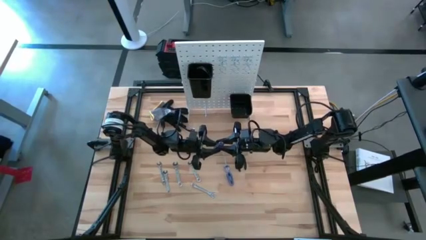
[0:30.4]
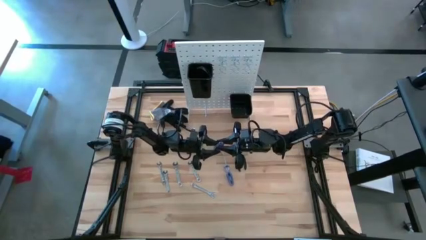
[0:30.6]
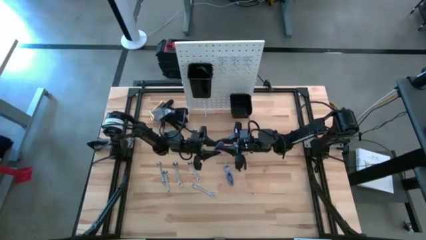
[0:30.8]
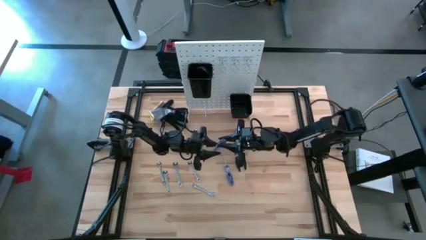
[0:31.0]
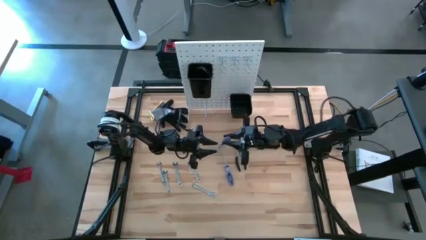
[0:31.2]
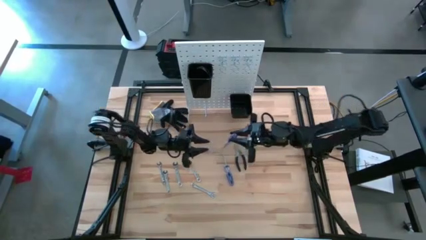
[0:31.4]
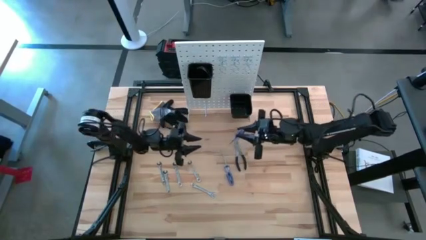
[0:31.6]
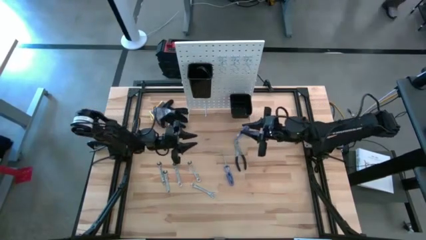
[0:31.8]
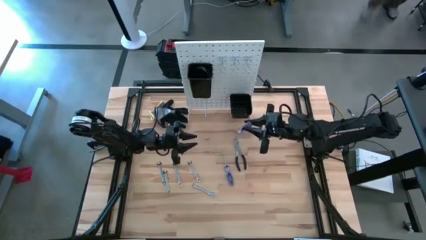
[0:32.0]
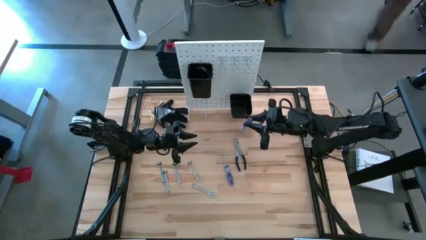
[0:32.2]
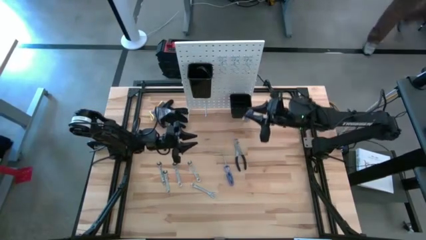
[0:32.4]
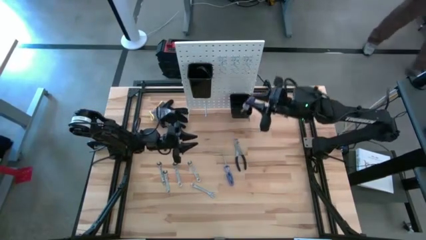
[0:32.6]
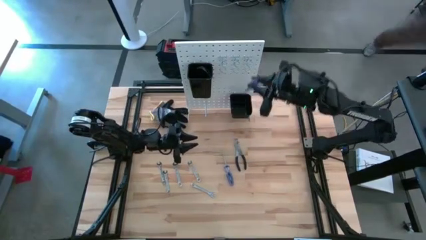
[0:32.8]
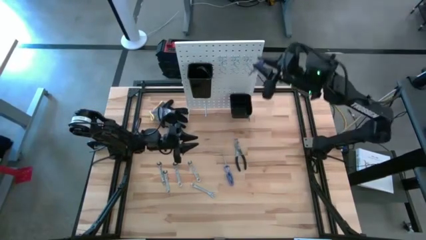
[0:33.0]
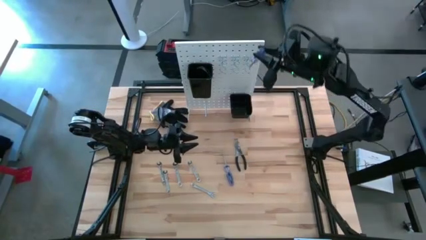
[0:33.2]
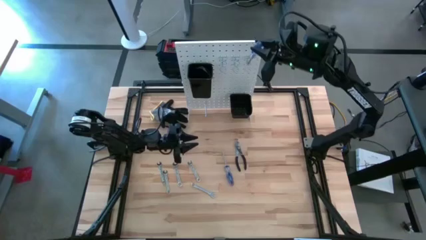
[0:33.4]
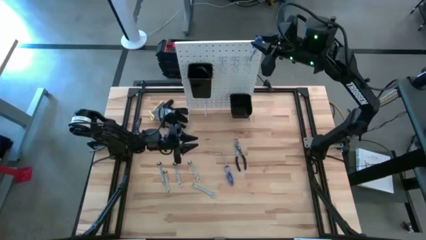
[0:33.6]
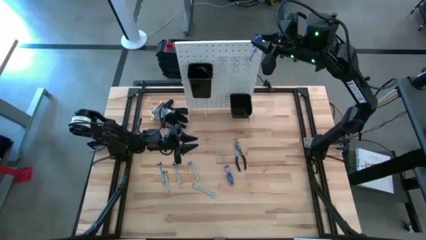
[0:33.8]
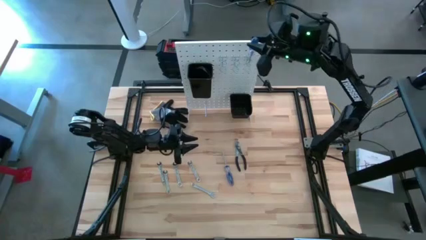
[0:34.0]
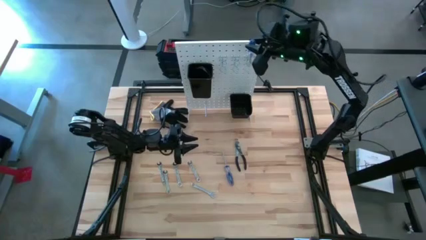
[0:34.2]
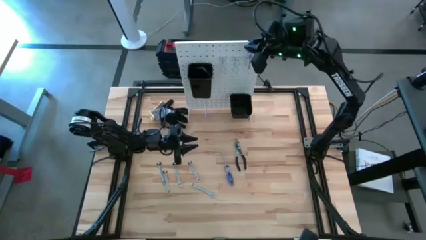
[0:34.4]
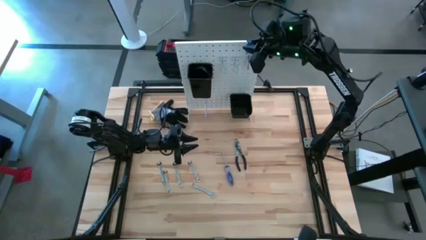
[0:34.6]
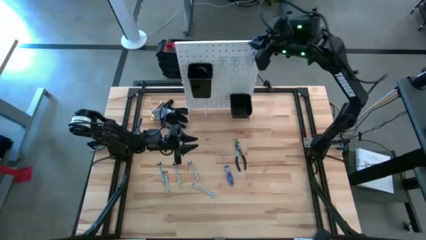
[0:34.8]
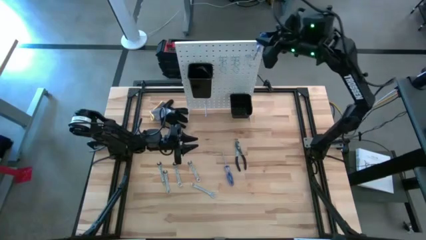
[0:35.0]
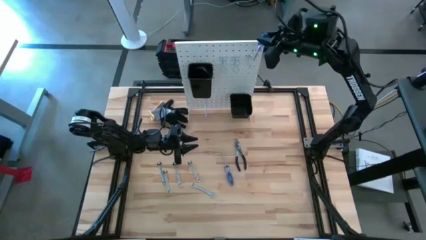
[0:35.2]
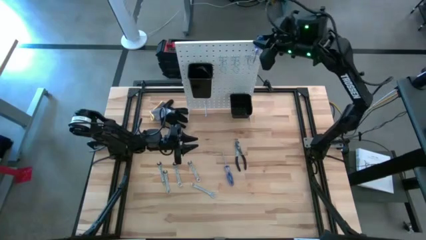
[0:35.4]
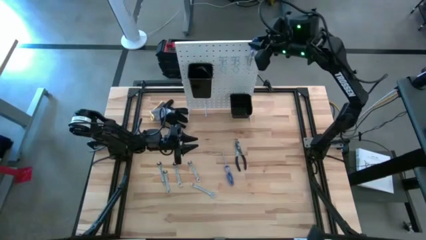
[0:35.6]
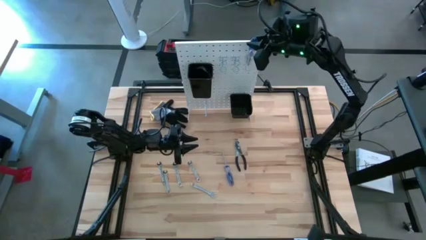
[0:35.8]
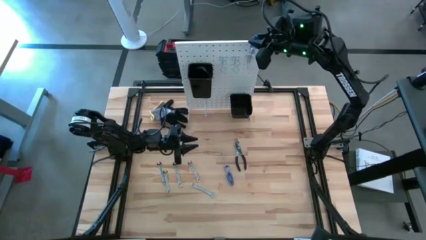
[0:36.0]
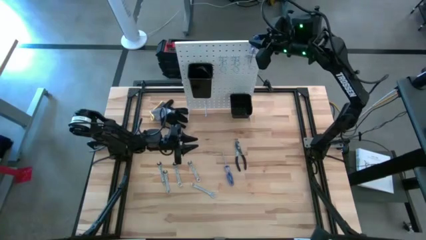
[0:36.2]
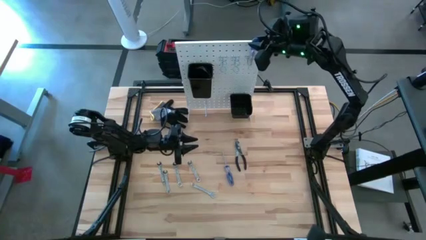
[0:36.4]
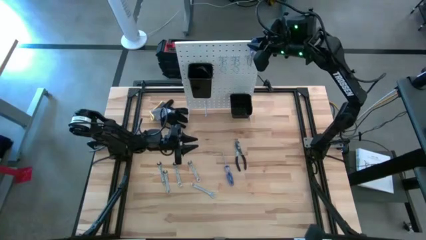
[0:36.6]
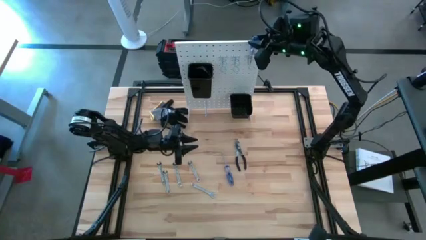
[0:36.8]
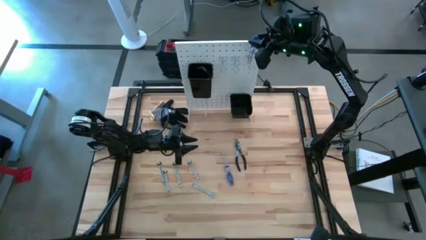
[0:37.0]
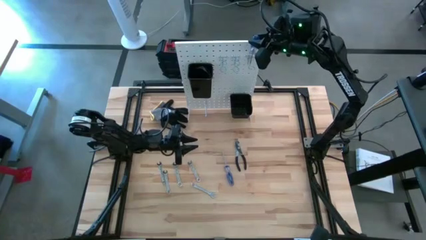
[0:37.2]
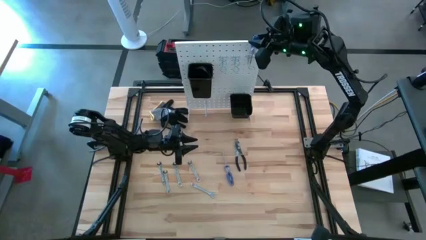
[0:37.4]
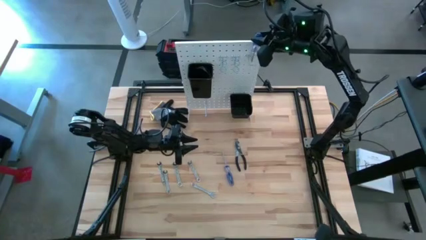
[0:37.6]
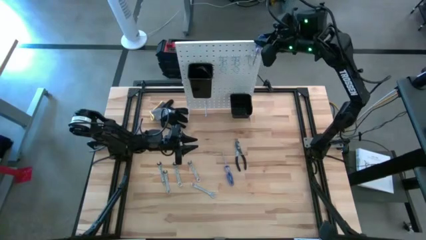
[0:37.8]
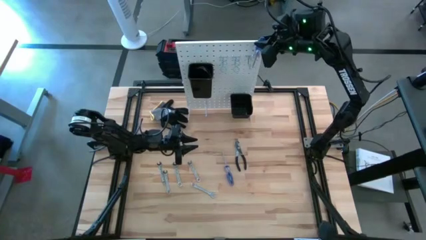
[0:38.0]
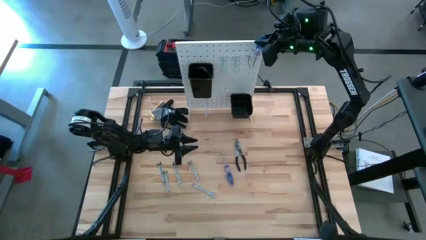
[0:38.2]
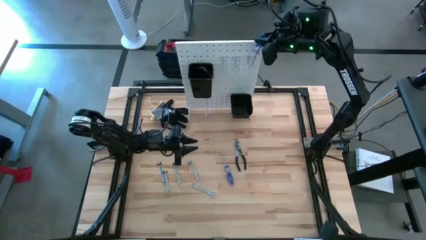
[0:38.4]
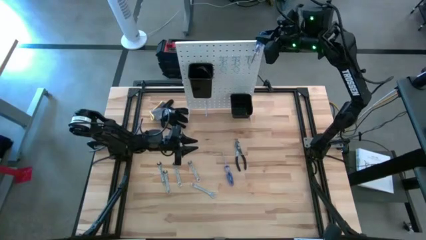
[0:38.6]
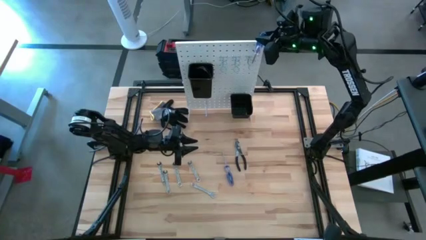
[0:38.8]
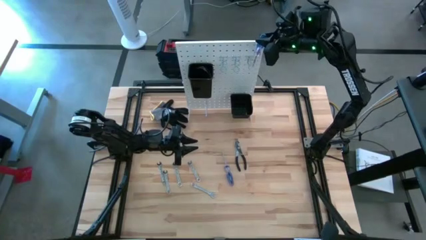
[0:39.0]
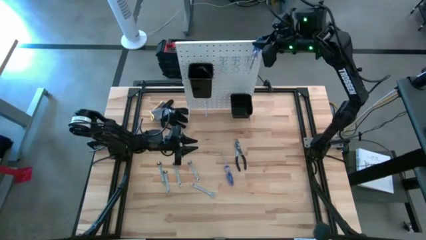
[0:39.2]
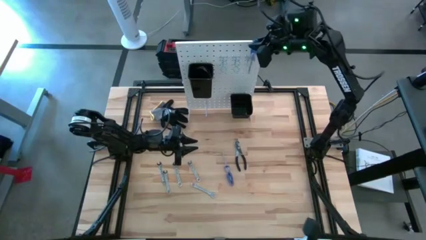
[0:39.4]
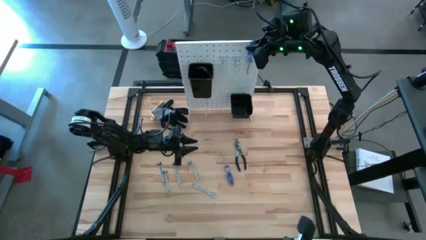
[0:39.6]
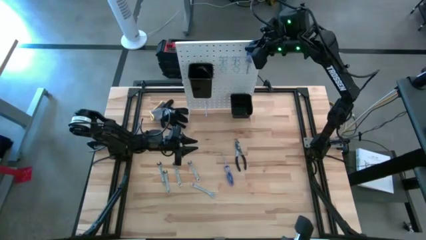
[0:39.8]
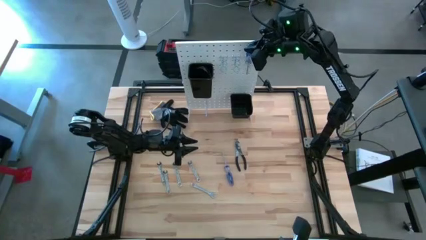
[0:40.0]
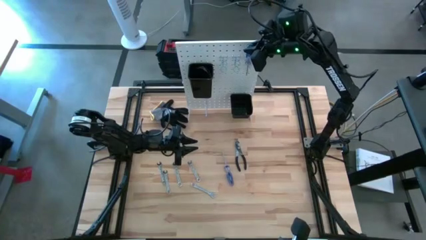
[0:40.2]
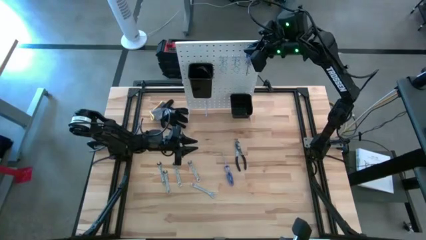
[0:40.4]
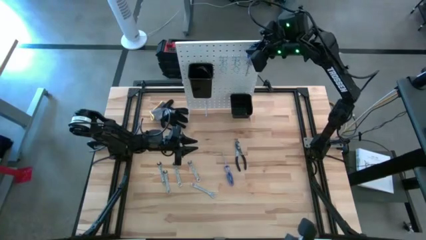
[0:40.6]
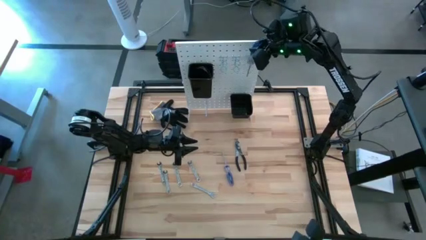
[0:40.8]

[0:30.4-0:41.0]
Task: Hang tools onto peg board
Hang the blue screwdriver on the peg board

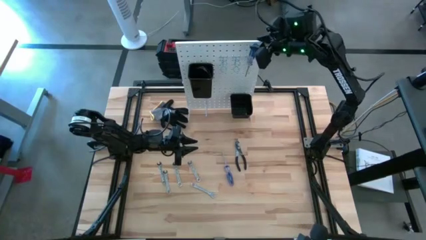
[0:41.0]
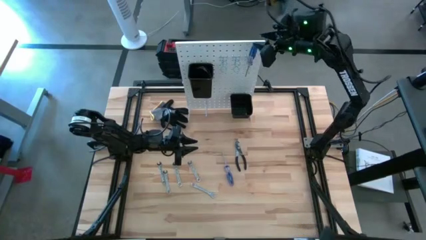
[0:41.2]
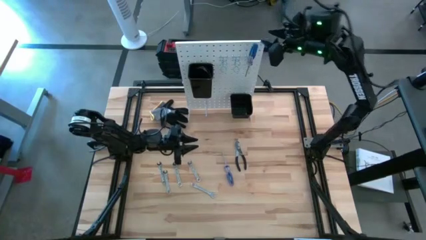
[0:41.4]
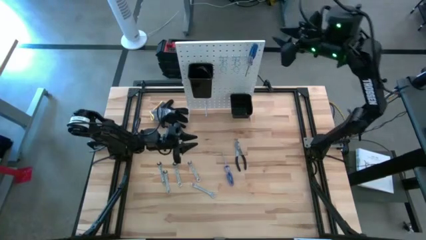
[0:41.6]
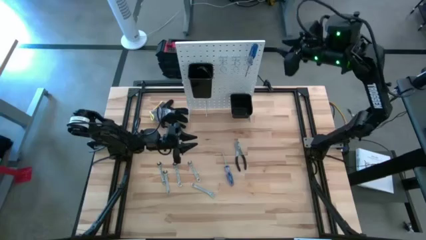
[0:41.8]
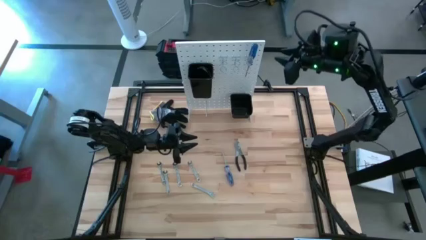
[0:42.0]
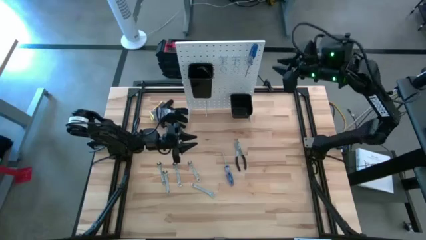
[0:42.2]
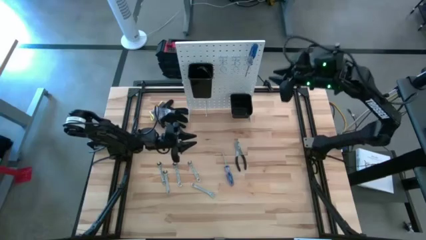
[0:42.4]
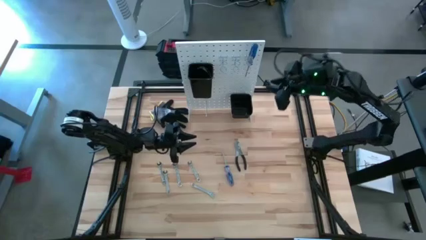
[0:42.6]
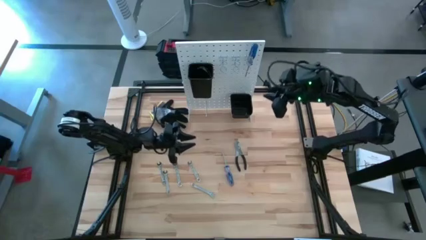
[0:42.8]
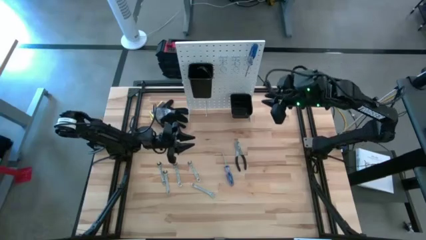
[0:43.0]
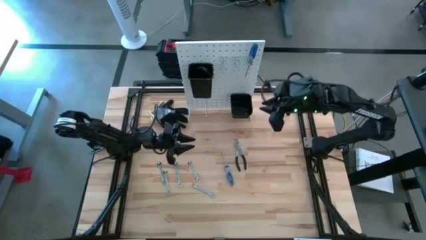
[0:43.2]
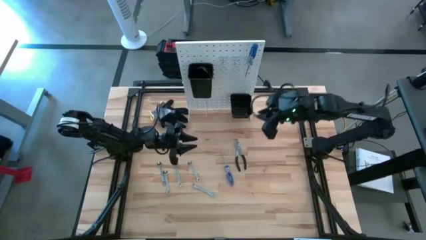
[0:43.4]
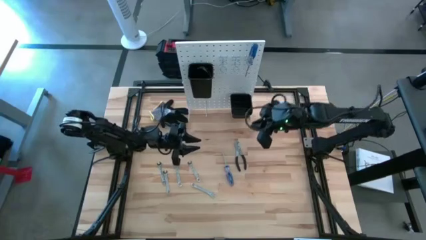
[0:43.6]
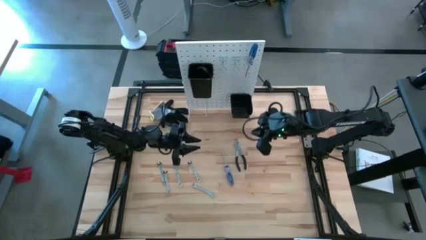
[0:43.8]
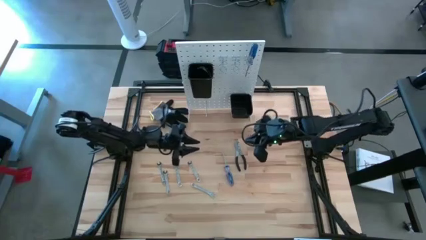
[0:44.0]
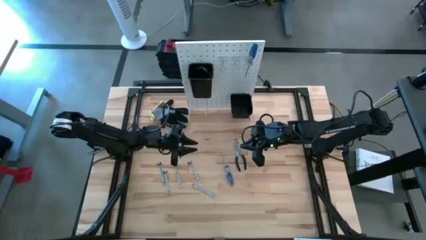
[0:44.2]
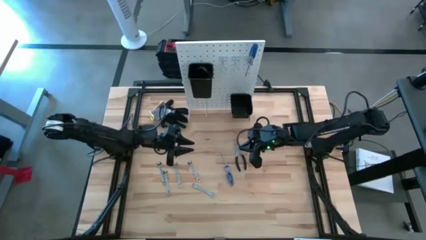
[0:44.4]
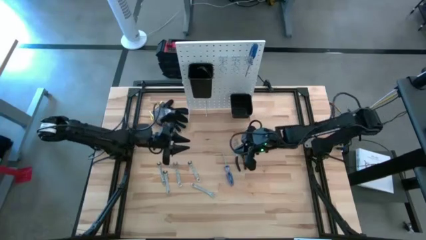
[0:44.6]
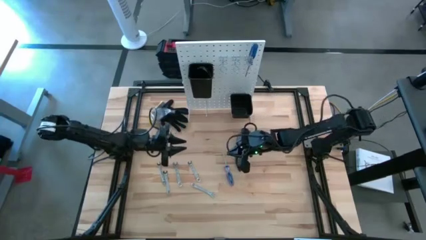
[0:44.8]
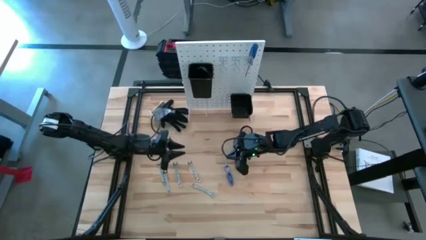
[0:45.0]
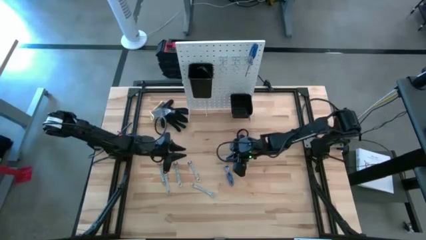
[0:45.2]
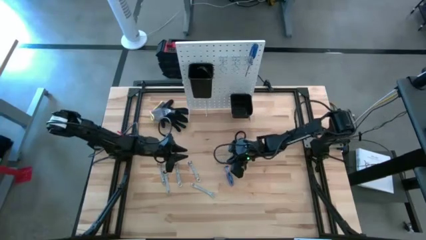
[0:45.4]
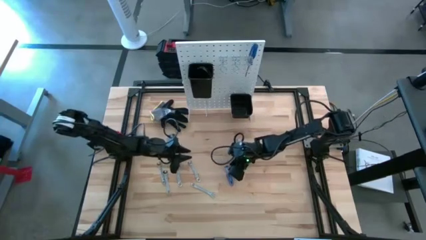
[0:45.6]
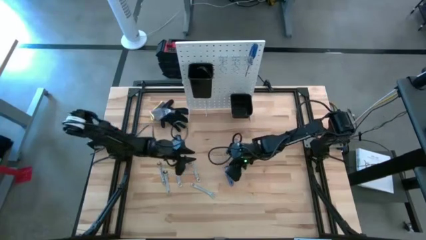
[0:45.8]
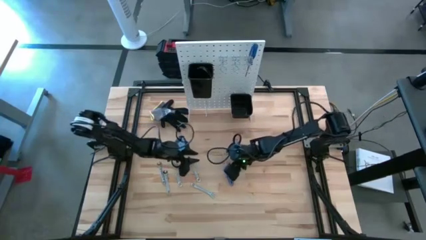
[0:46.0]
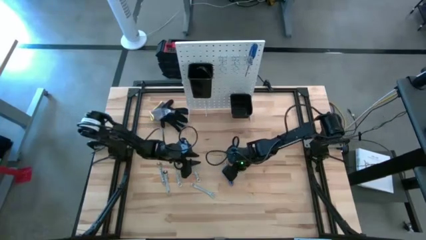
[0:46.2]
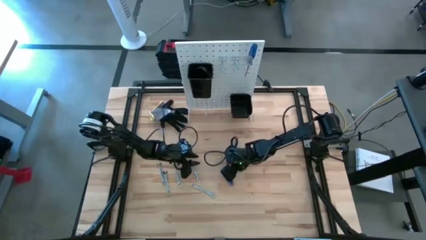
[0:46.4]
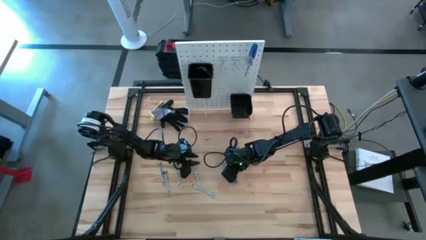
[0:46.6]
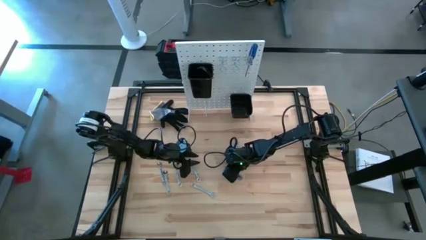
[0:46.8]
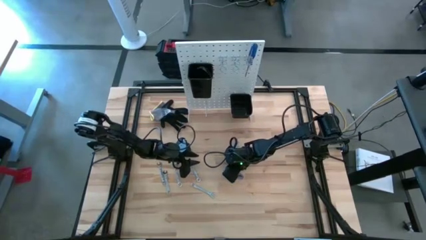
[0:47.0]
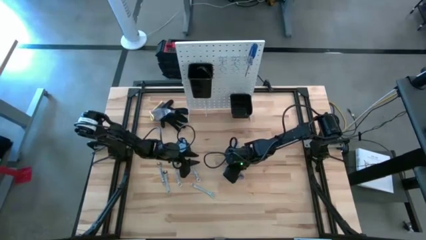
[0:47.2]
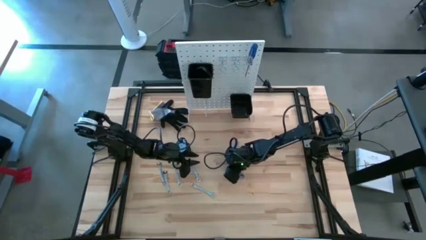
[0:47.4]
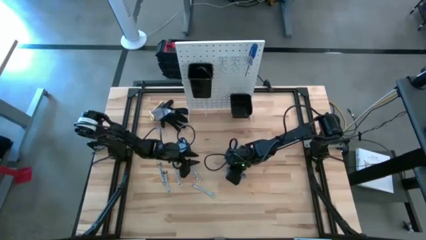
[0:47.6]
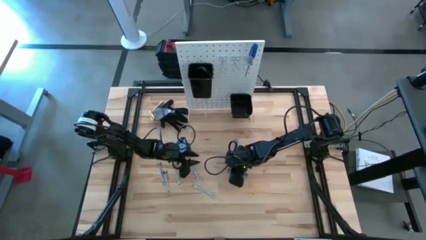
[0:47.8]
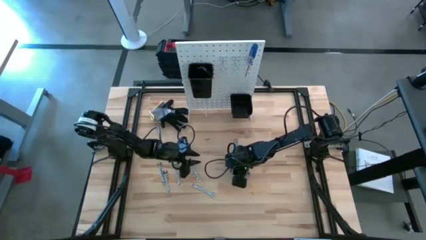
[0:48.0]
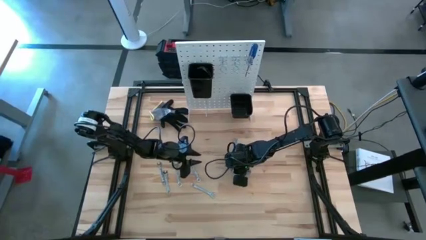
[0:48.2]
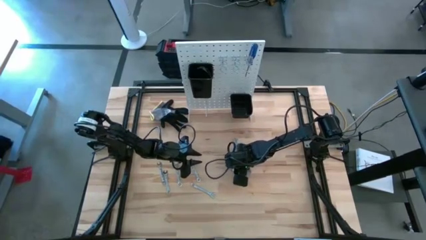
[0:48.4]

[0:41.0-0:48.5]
Hang the blue screwdriver on the peg board
